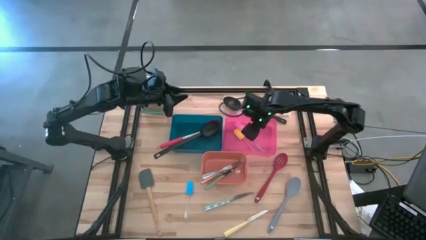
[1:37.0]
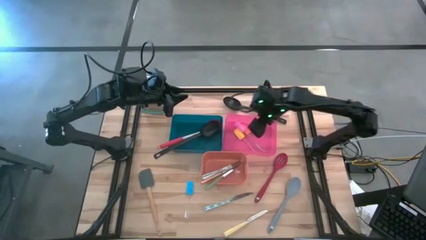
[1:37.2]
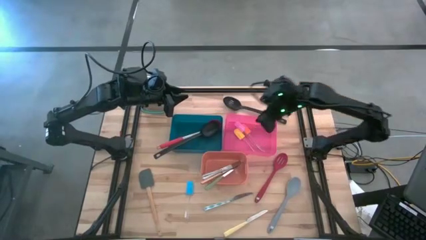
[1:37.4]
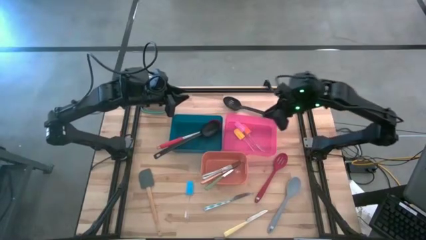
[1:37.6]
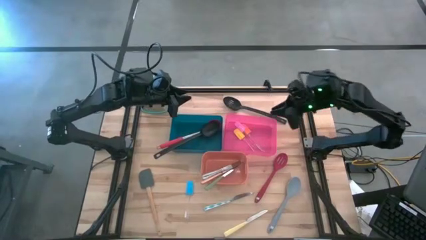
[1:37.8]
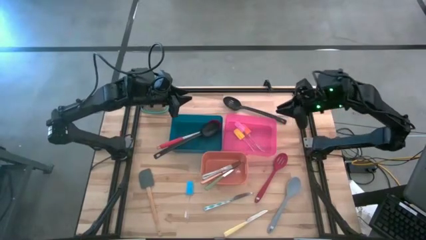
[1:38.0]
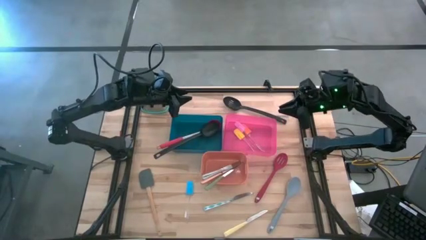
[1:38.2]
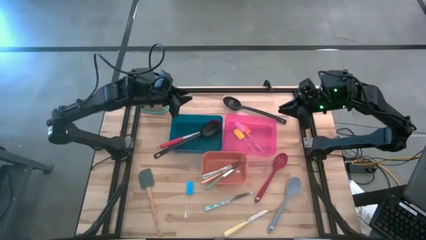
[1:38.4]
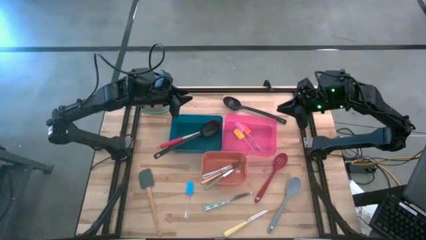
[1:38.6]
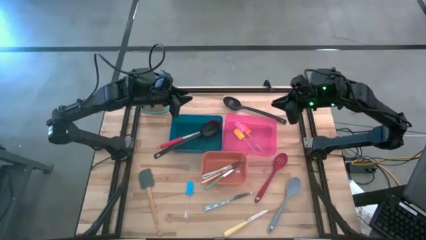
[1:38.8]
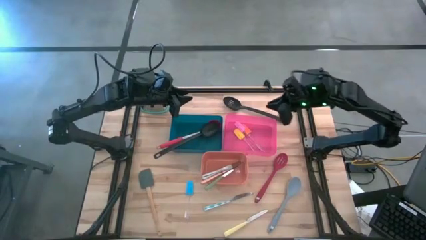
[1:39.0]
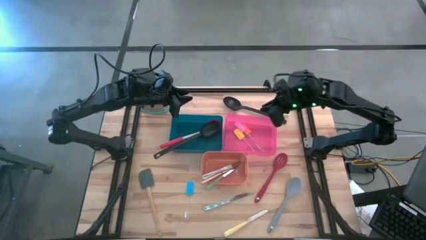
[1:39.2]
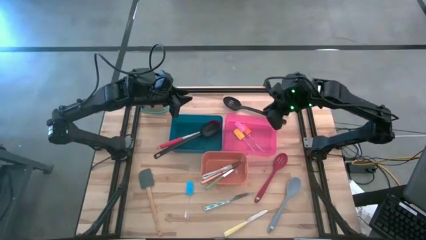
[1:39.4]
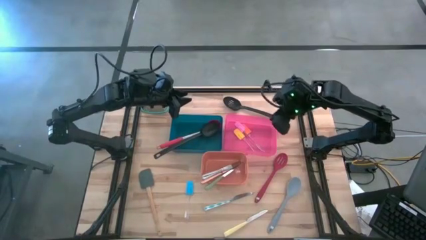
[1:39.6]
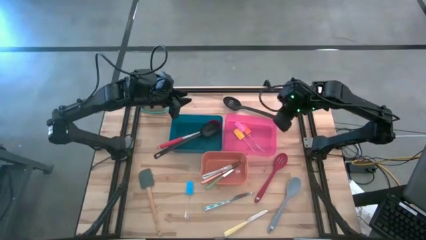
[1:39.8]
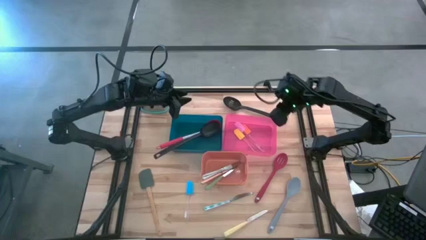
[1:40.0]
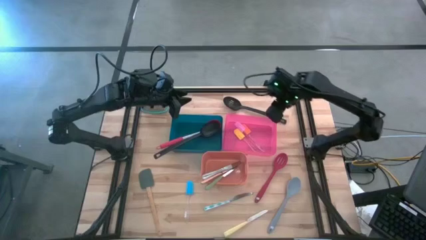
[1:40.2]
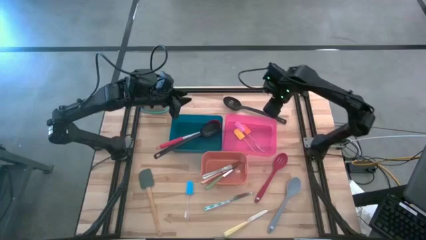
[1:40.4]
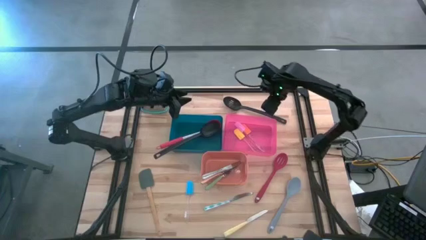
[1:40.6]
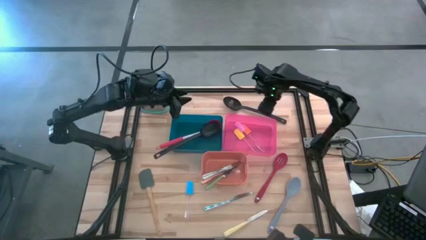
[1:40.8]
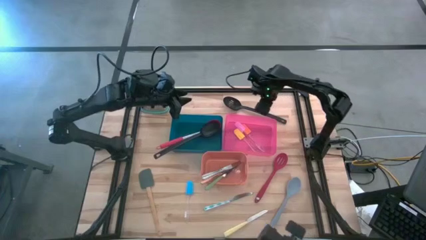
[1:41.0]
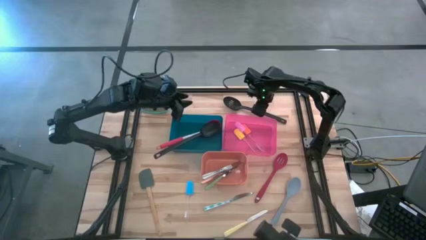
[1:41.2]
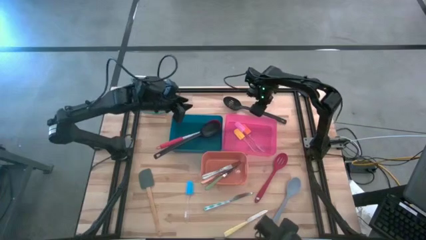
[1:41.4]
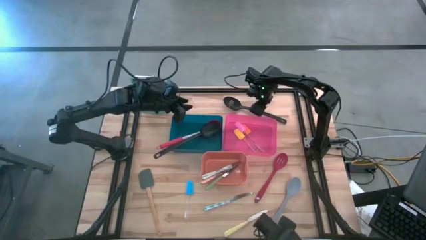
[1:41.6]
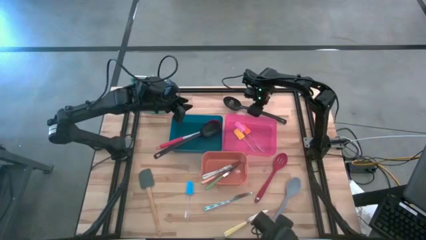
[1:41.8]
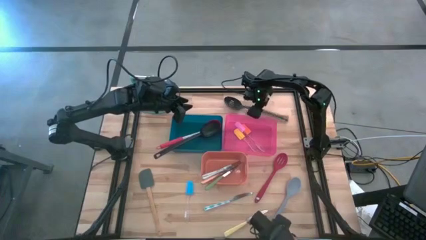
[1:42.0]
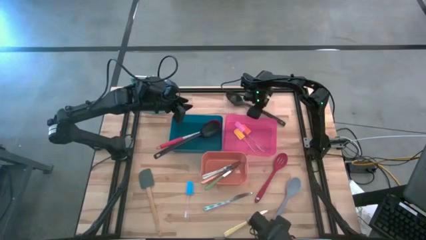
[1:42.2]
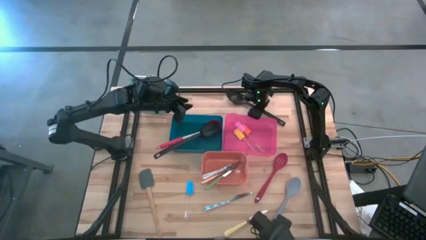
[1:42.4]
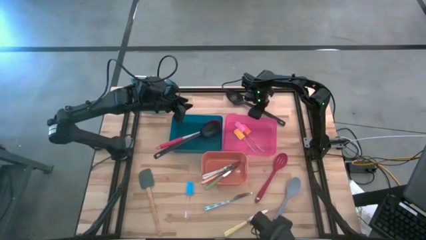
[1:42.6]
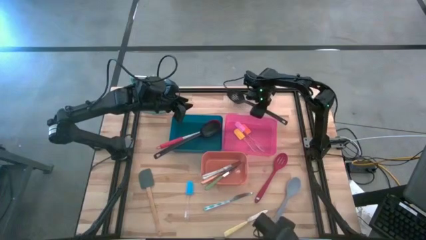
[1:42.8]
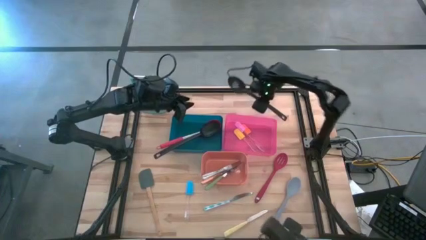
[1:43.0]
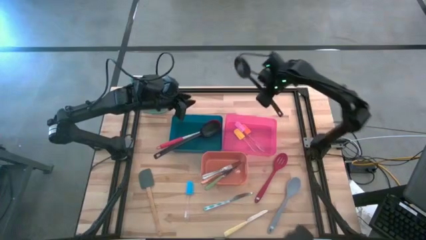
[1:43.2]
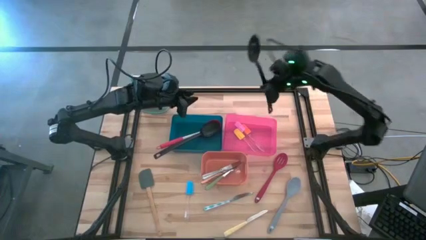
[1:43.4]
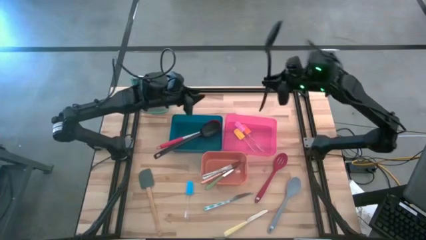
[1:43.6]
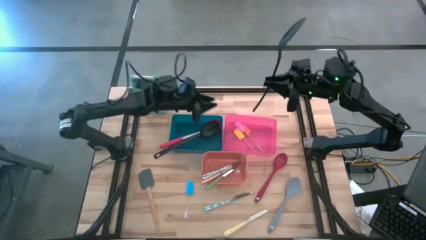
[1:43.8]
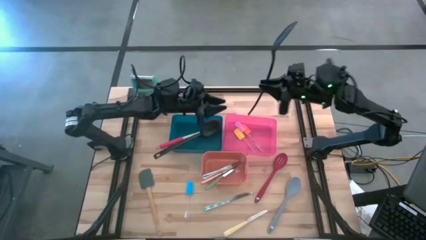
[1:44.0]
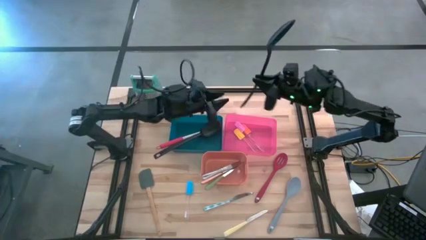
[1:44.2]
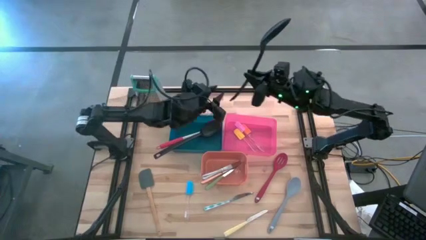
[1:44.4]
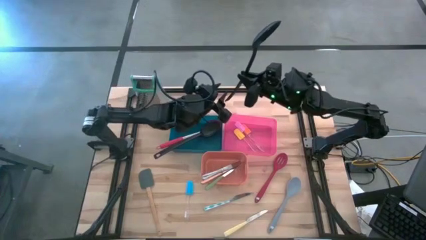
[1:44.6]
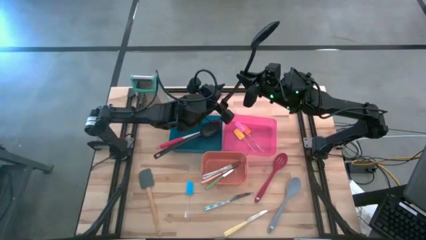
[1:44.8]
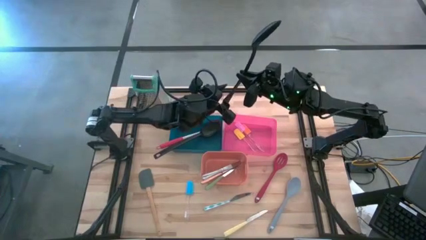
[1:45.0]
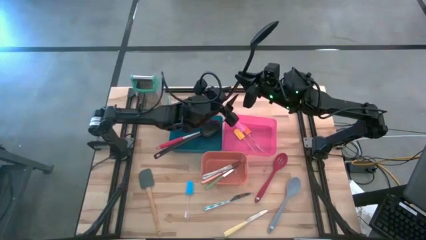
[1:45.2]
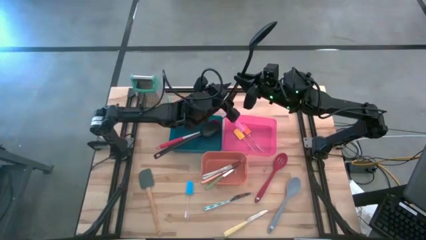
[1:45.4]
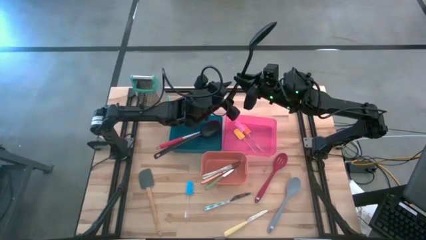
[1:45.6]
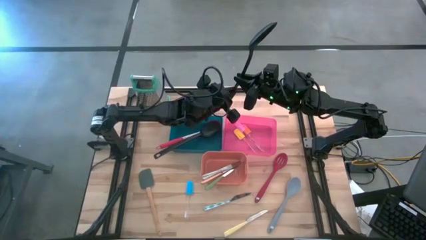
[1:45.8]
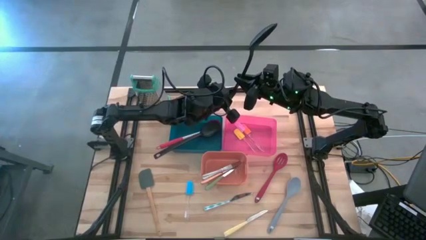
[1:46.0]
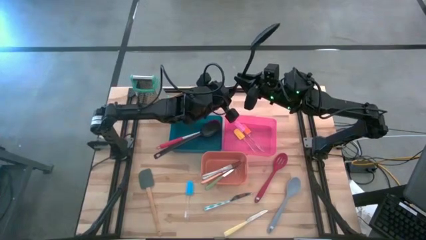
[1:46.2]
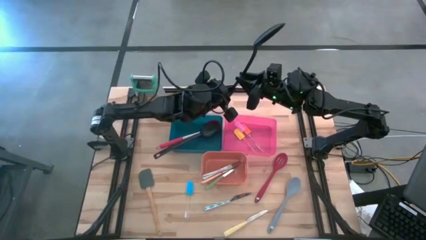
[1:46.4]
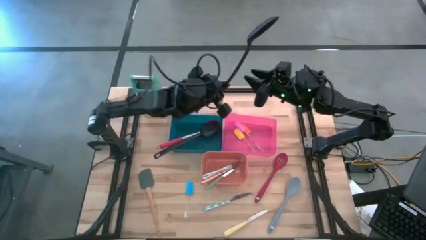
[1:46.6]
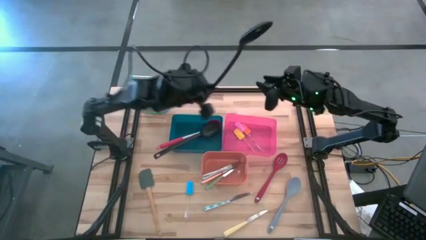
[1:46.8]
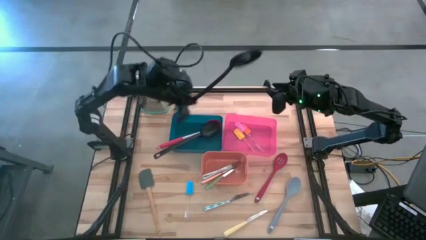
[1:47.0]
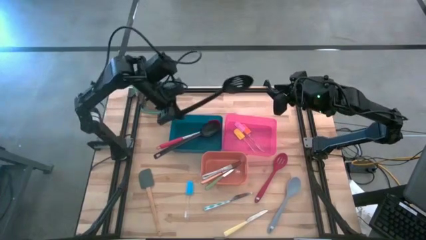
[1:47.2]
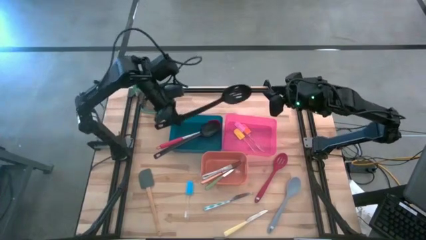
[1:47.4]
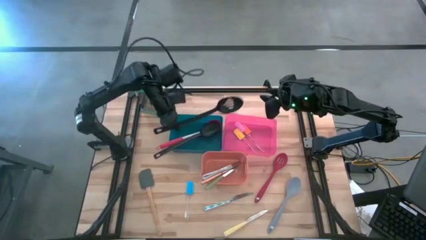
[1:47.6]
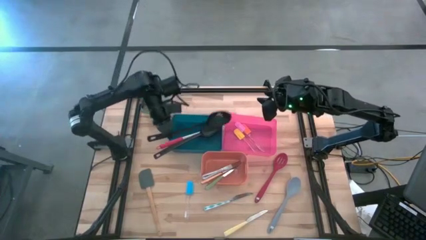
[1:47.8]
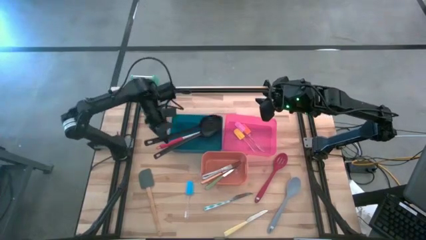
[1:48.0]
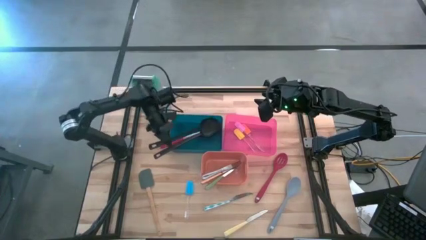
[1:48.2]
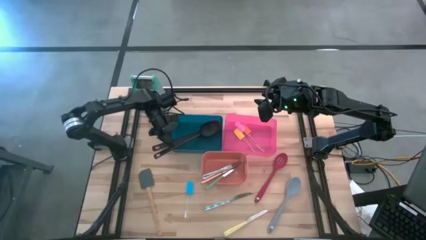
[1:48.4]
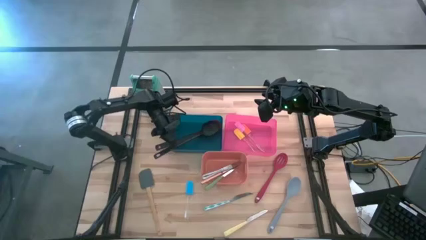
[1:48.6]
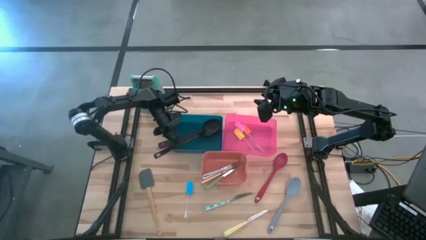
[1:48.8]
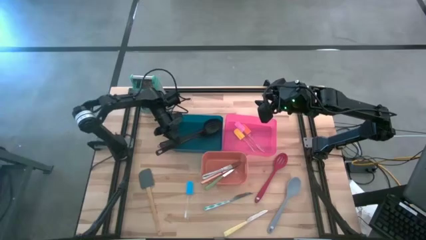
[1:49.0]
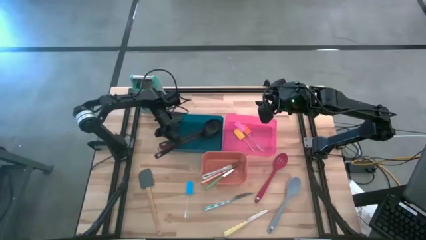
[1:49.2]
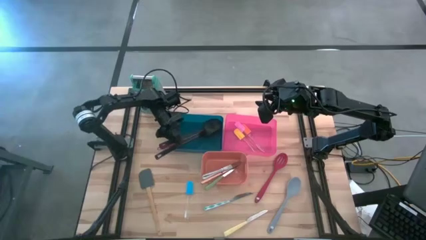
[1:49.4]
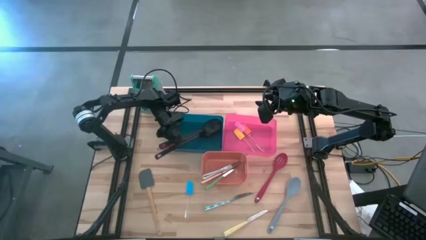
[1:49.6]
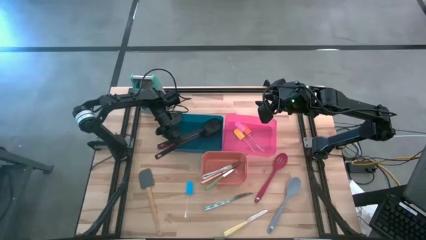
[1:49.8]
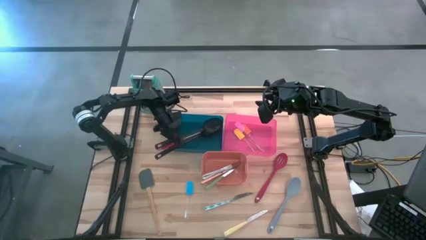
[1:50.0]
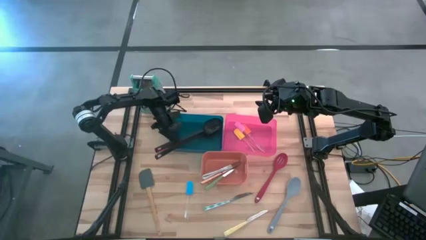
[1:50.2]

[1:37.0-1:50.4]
Task: Pick & Place Kitchen Items
Put the black serving spoon into the blue bin

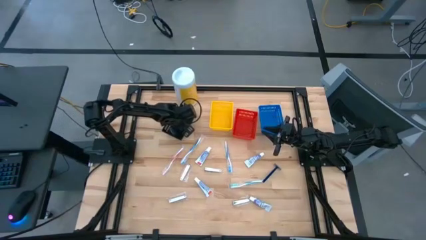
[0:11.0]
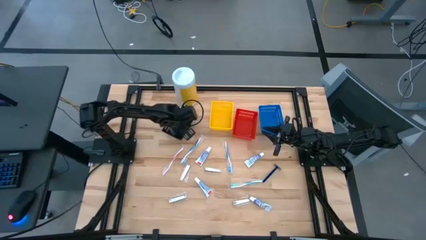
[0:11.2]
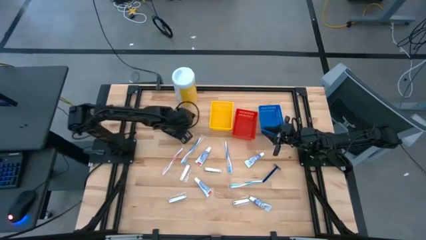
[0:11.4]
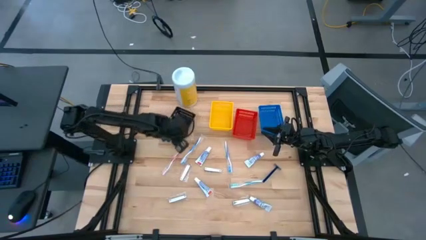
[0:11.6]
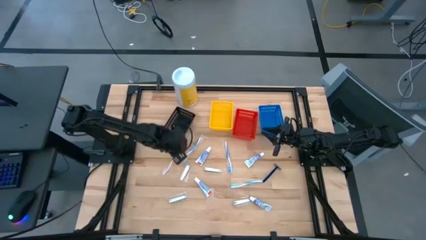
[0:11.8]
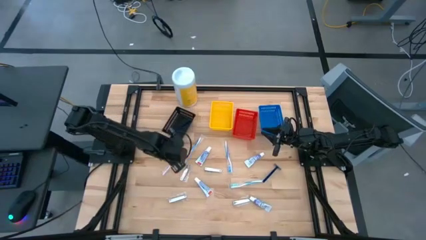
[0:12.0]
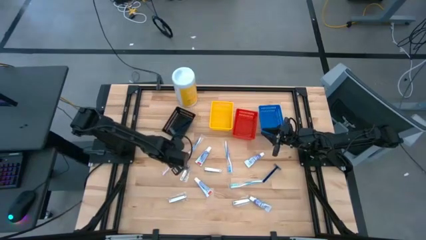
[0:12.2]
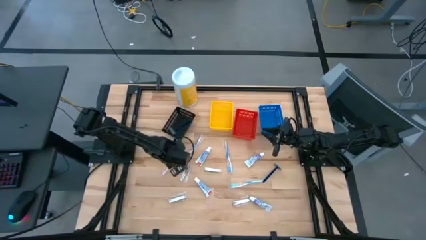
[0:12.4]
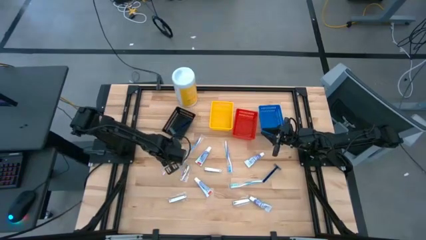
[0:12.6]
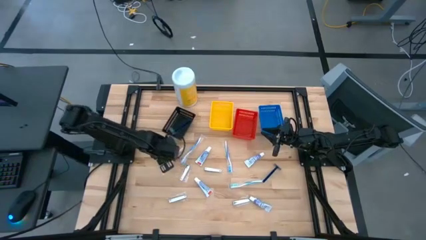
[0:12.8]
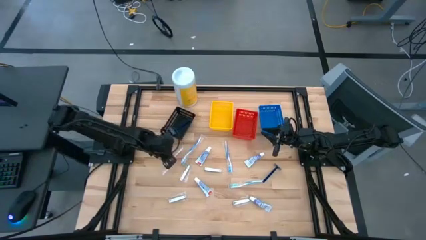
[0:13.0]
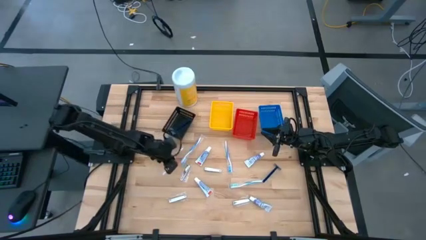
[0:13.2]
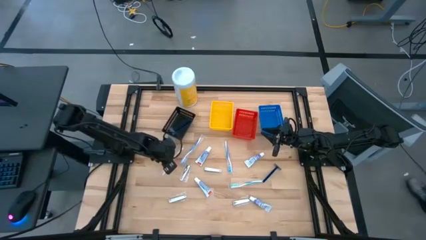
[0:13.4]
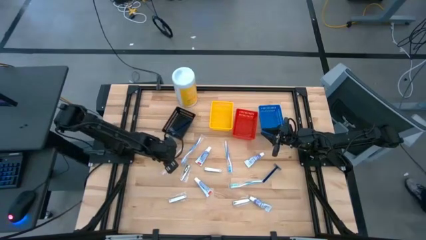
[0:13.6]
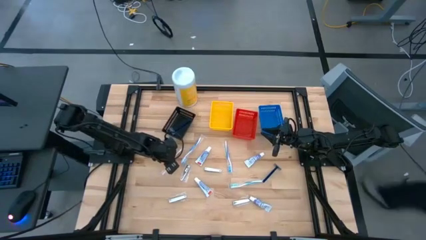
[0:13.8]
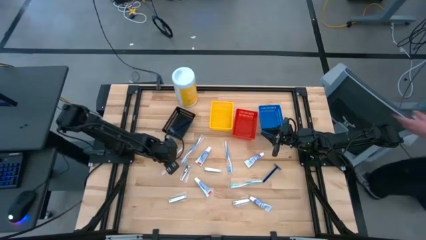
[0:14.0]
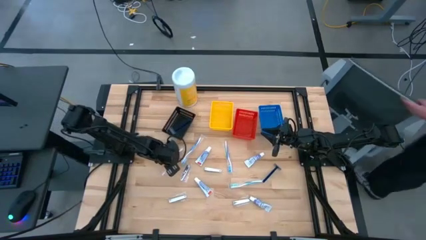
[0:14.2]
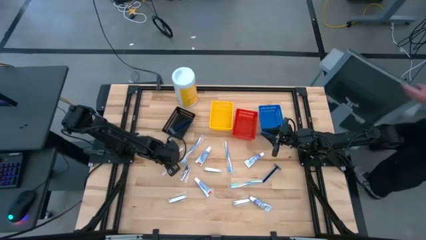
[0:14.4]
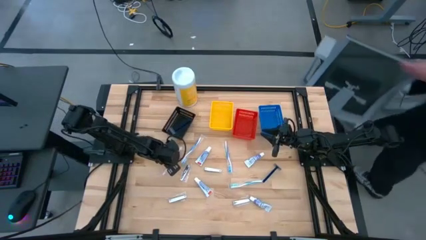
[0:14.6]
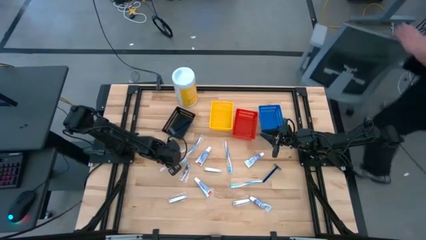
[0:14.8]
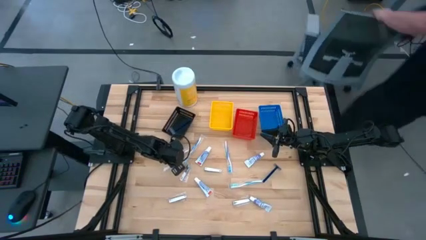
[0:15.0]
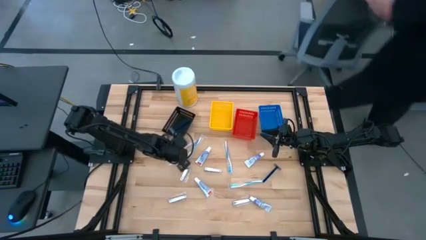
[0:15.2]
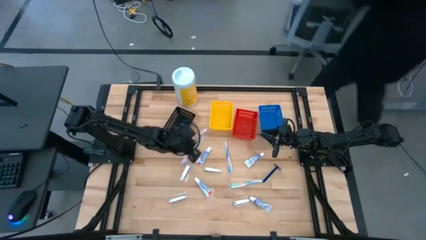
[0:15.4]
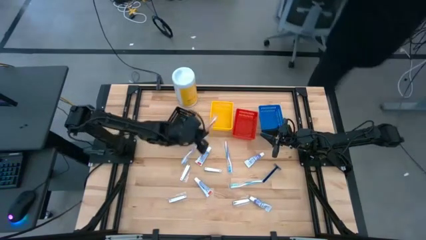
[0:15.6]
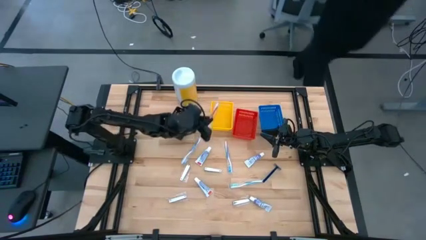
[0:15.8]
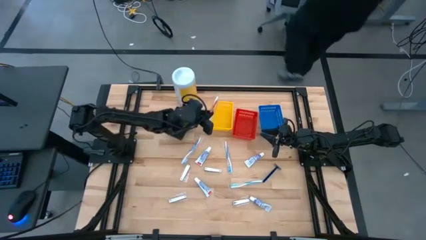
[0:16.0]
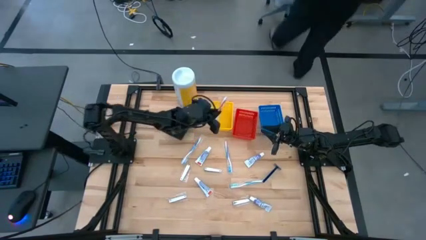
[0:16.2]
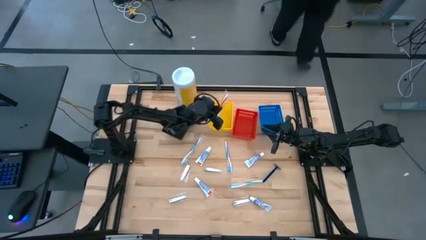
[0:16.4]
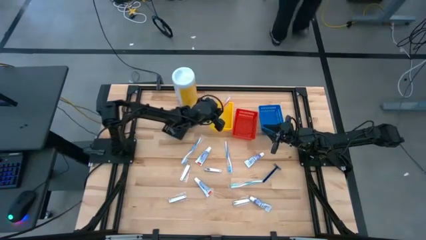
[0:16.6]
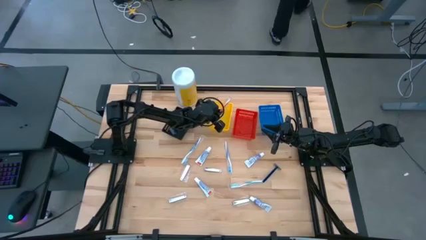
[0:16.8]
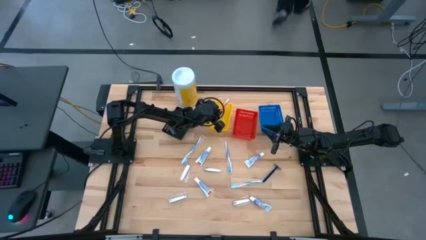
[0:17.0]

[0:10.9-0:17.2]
Task: Pick & Place Travel size toiletries
Put the orange toothbrush into the yellow bin
